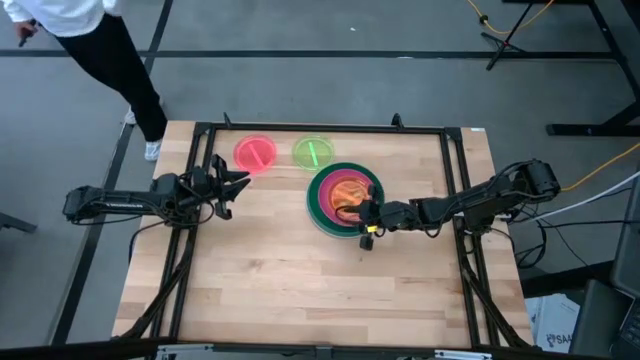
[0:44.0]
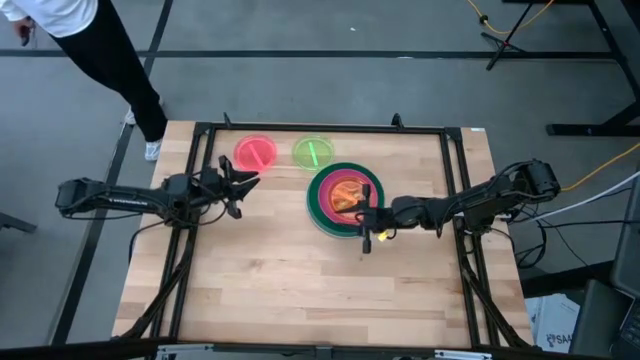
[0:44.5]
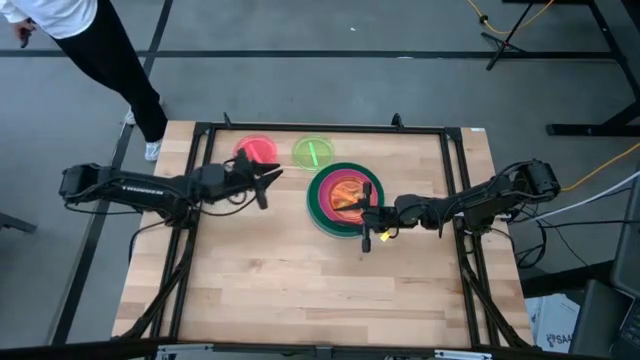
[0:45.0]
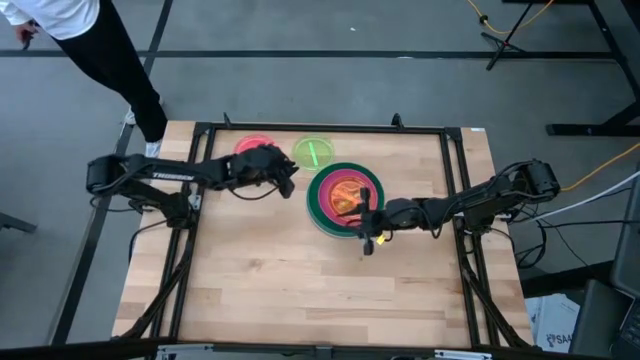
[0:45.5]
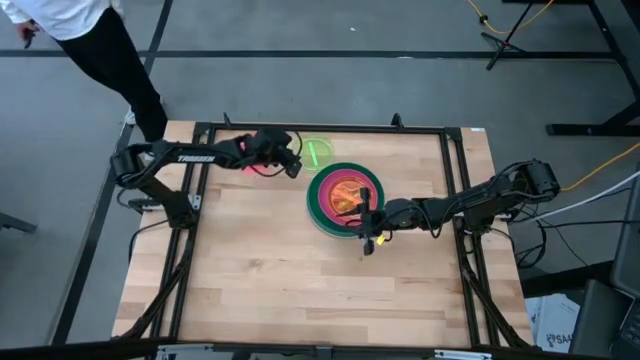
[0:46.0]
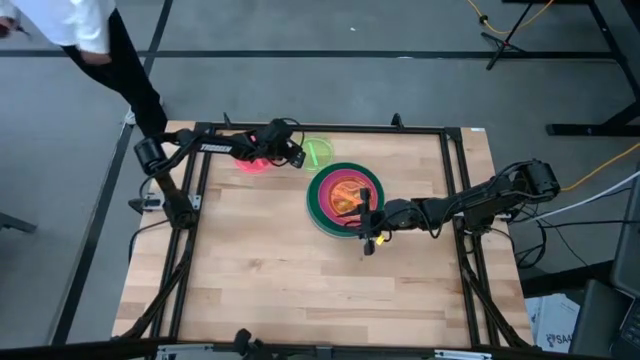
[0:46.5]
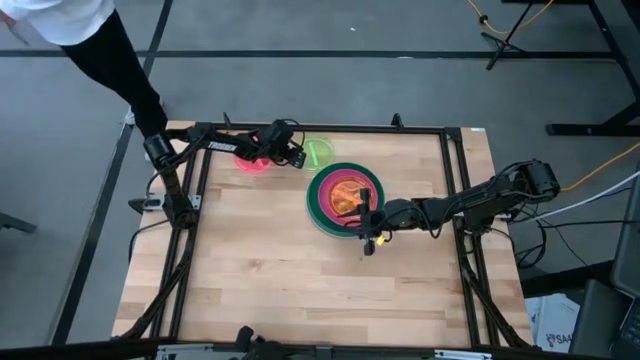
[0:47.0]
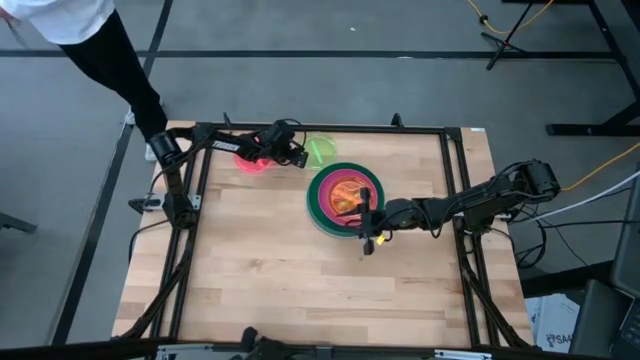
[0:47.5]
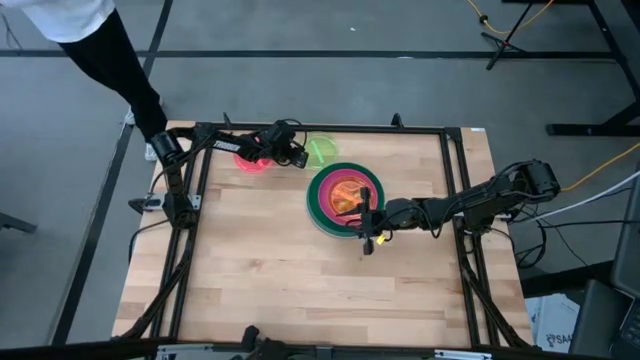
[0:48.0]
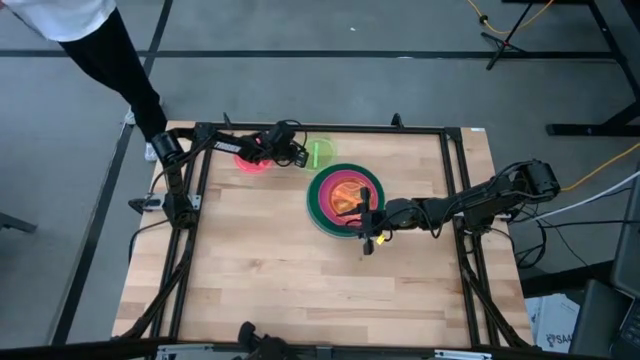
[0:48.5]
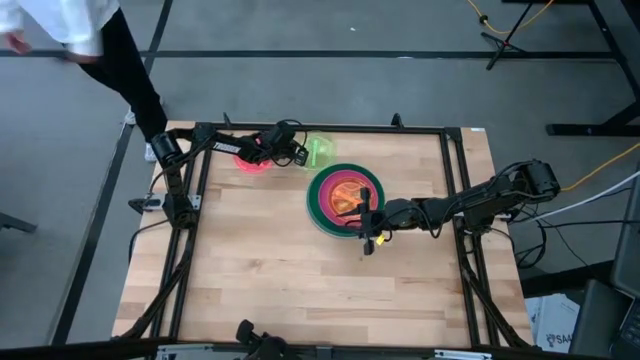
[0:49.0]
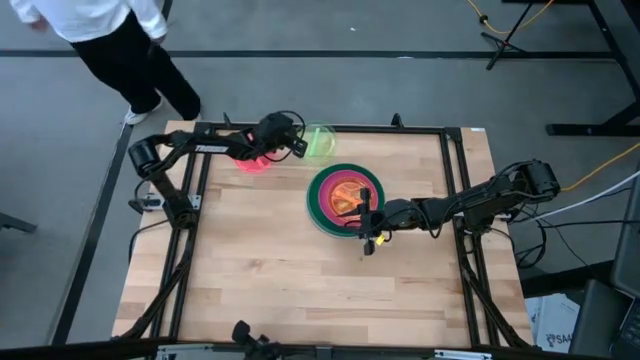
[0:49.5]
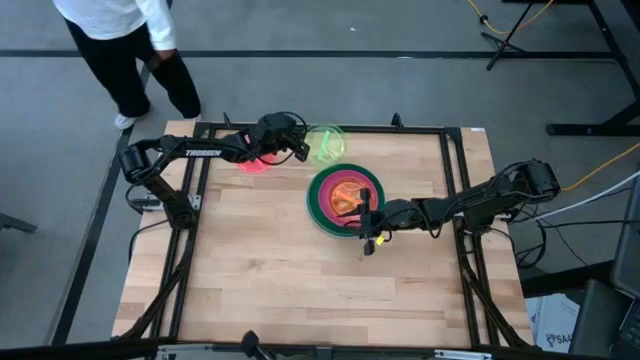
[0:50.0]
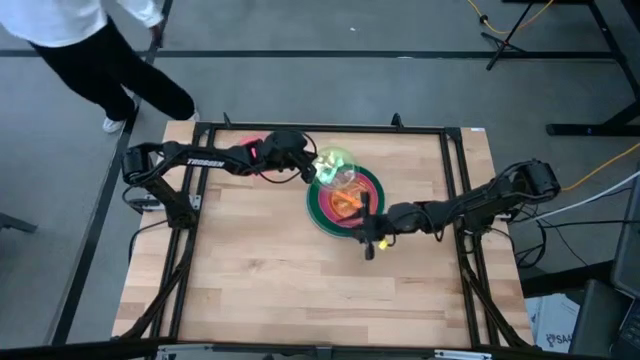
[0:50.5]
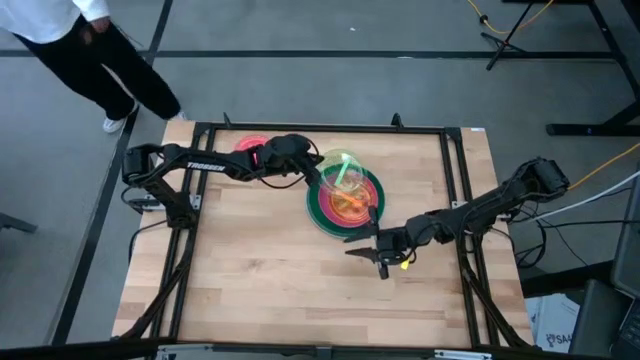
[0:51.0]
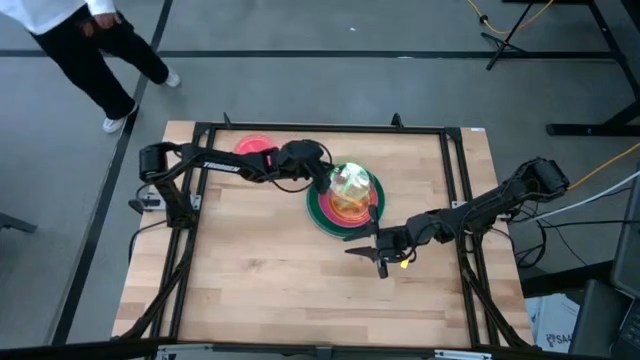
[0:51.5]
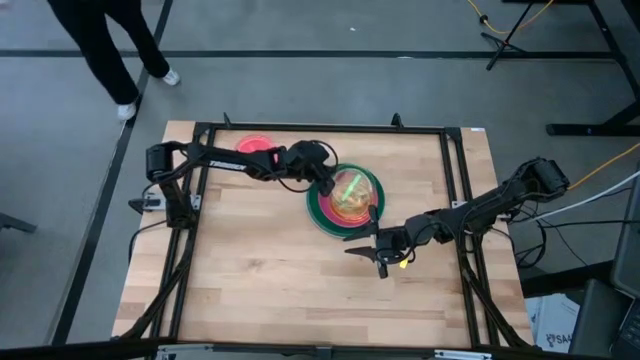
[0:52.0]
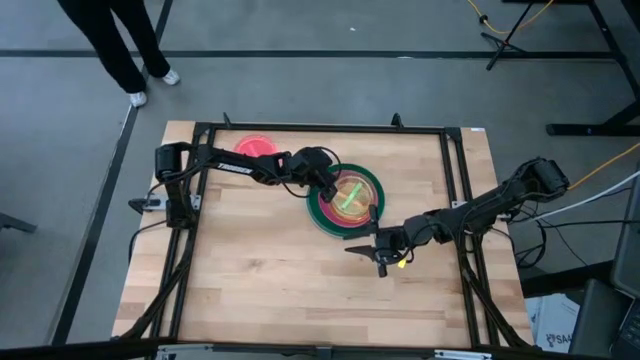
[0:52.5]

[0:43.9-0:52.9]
Task: Stack plastic plates
Stack the light green plate on the orange plate

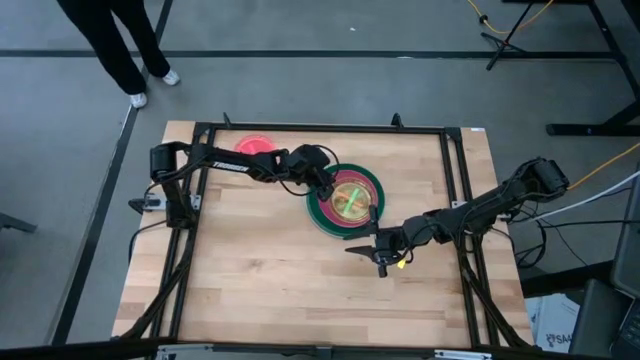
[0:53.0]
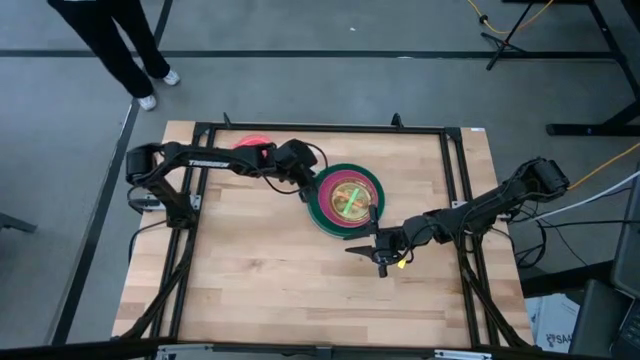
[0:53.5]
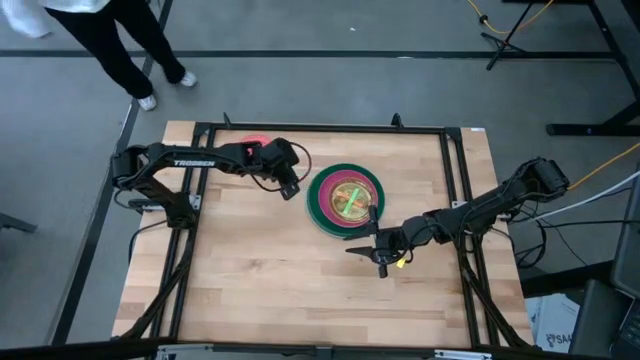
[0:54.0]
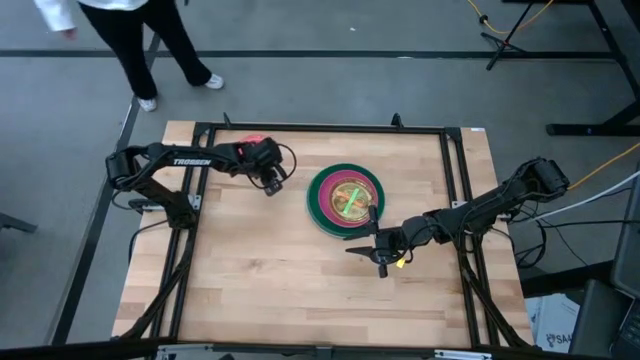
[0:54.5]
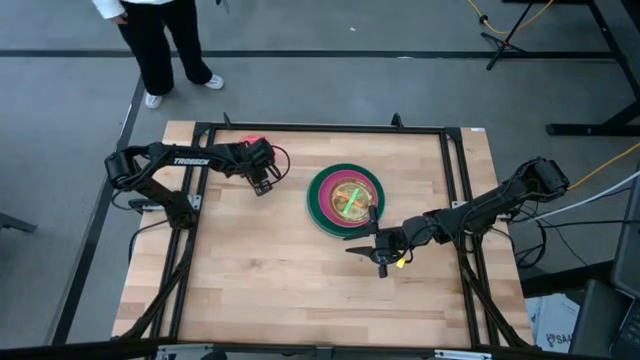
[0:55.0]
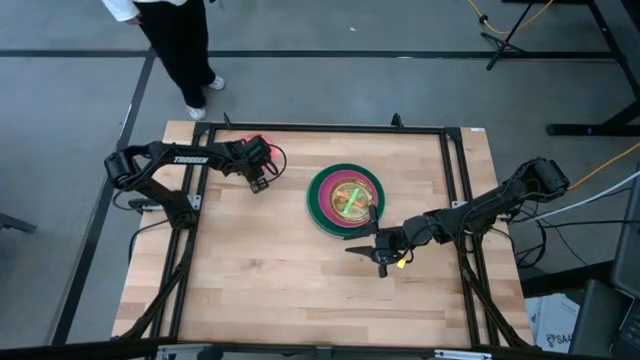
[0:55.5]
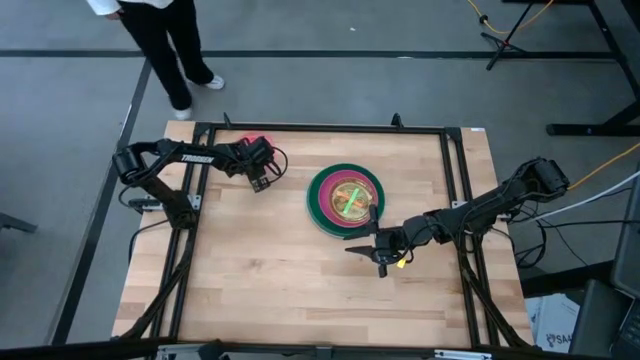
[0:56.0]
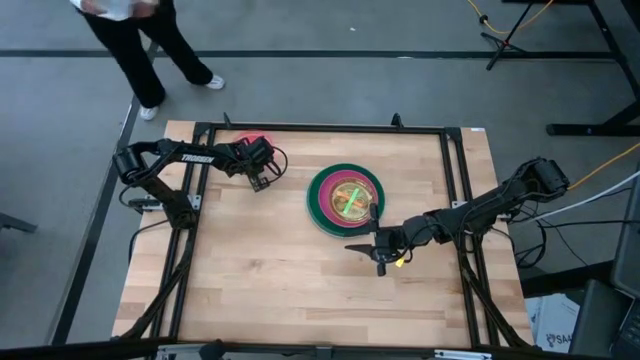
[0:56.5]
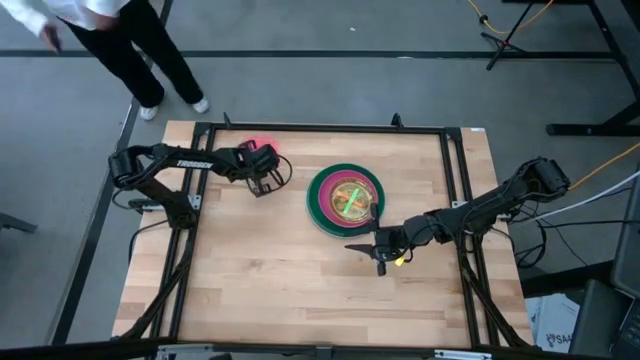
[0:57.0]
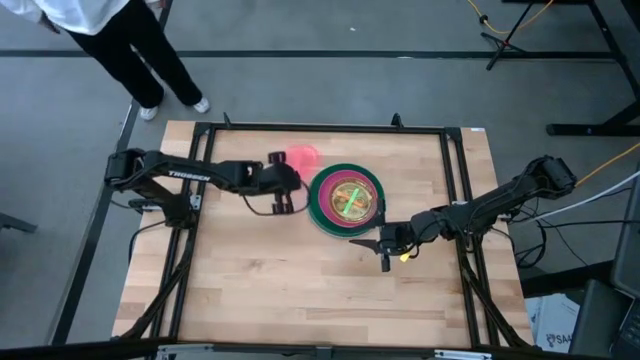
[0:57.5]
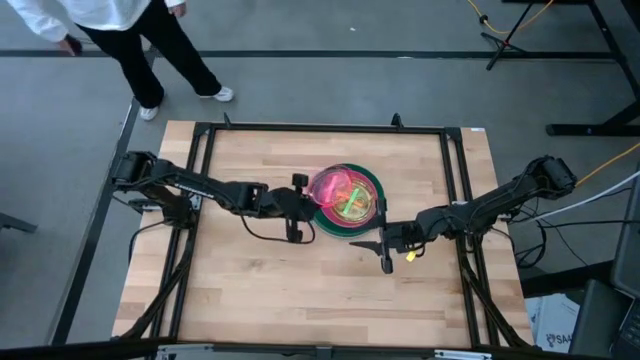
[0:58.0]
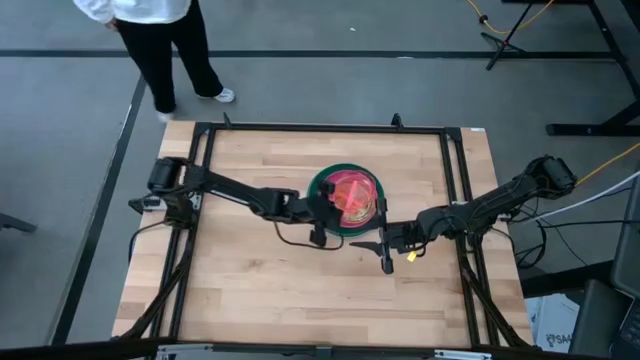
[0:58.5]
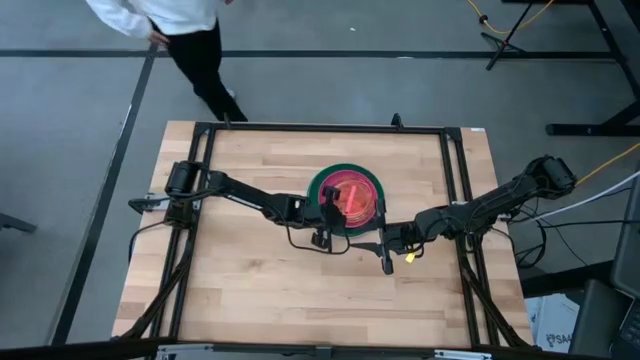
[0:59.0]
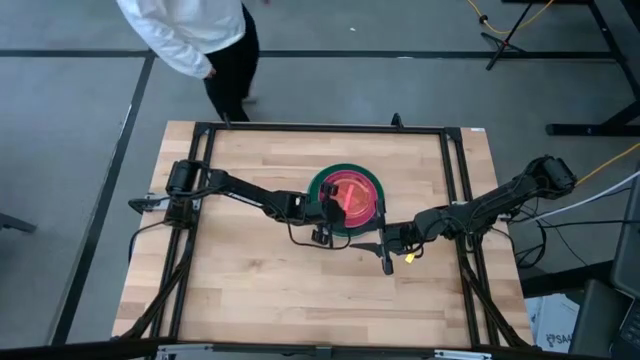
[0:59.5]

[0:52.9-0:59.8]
Stack the light pink plate on the light green plate

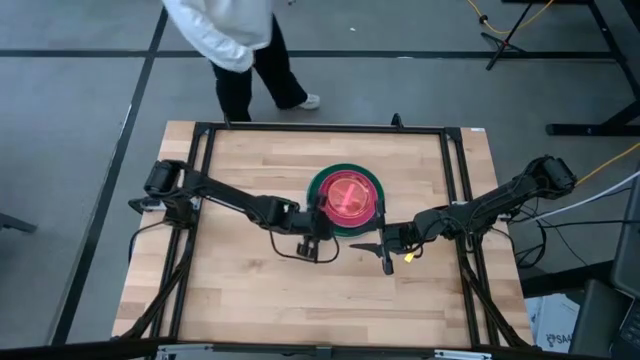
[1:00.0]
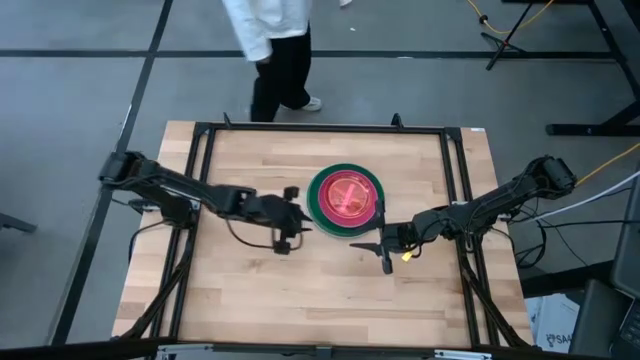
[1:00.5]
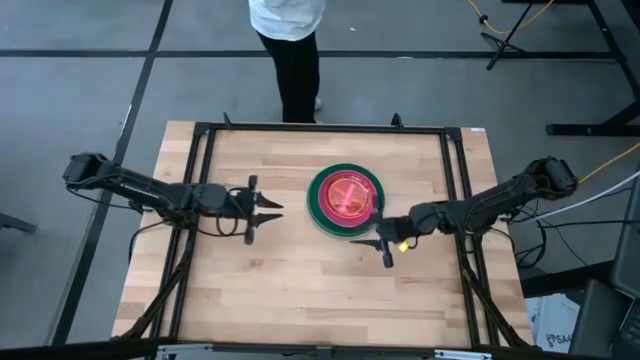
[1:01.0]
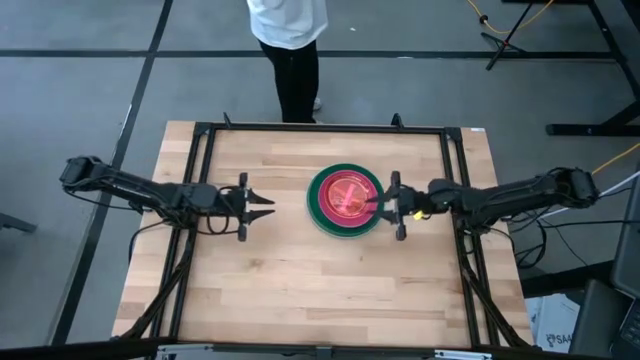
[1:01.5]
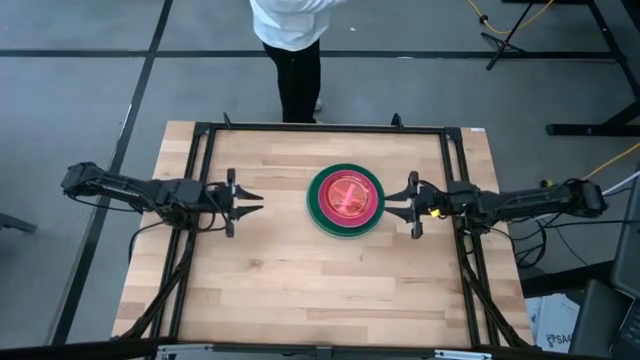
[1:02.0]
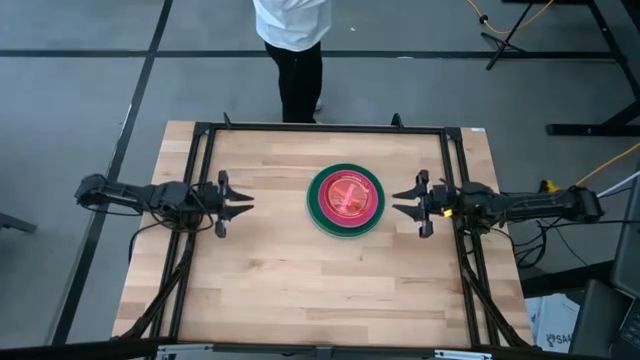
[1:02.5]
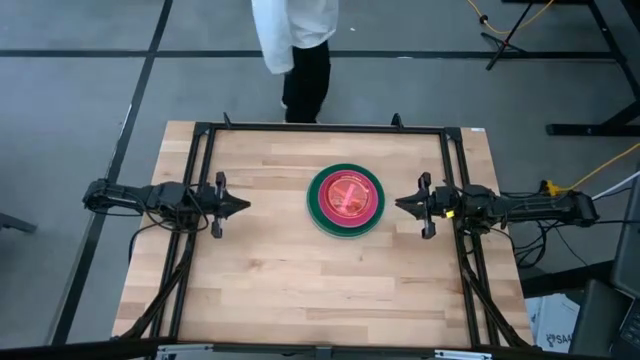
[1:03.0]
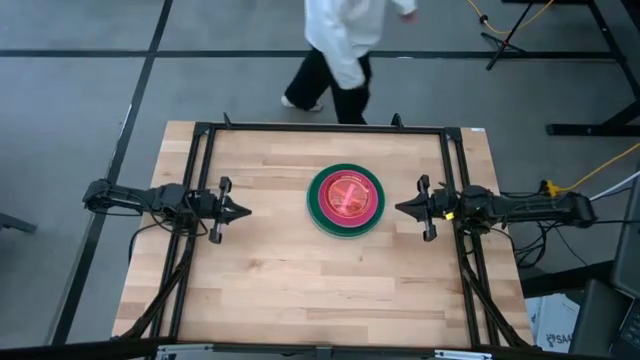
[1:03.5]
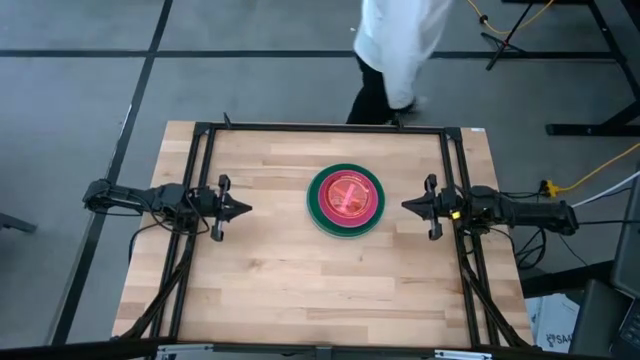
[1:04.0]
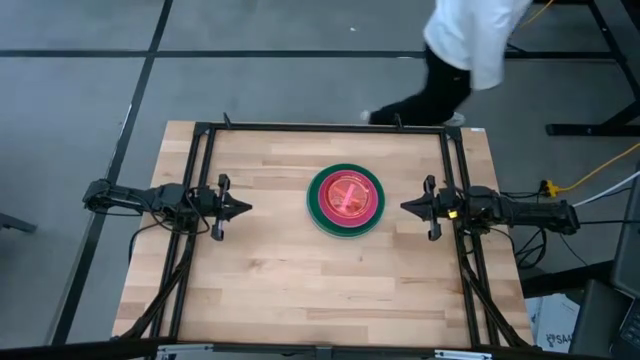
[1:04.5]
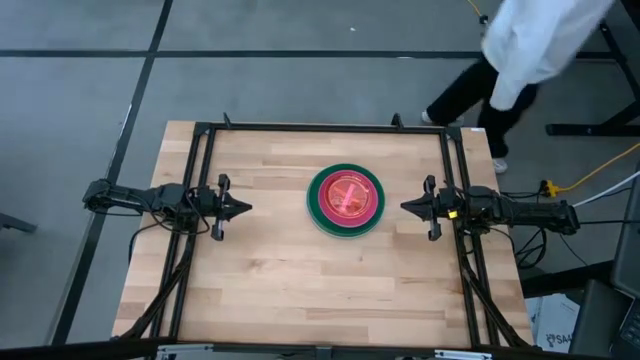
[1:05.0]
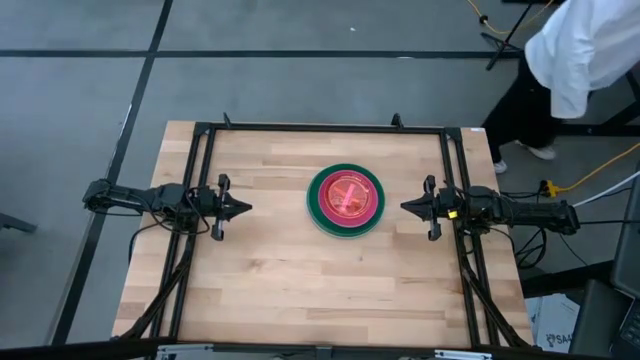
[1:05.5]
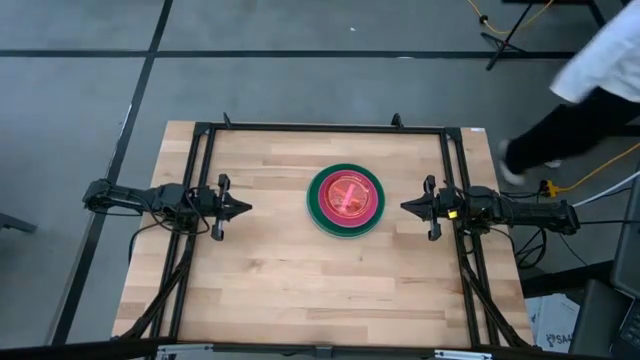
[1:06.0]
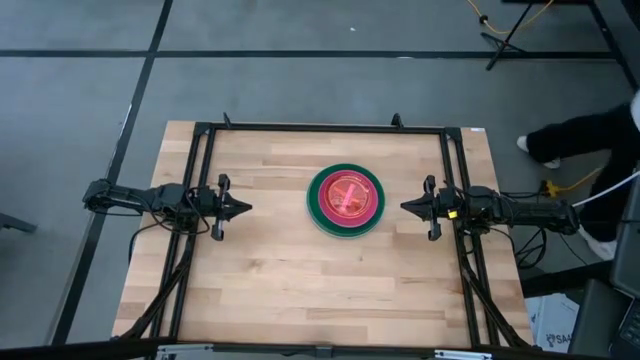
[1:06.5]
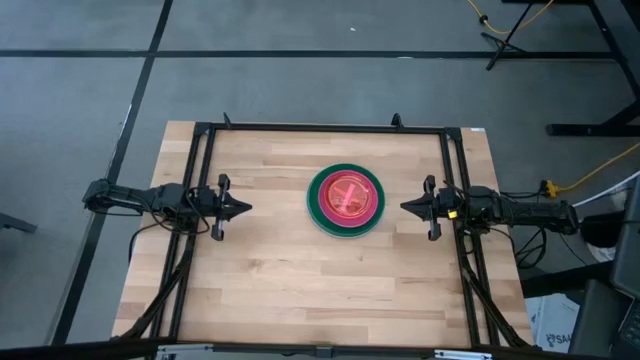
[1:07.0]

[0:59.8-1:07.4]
Return to Home Position
